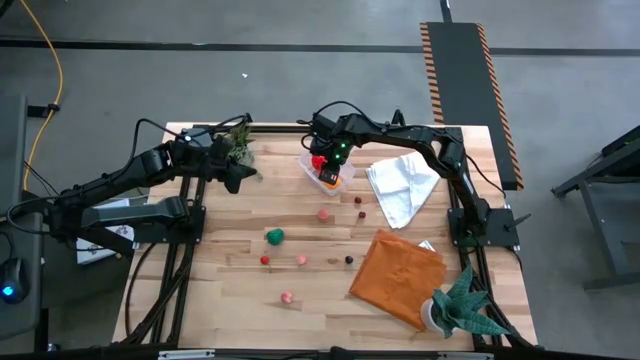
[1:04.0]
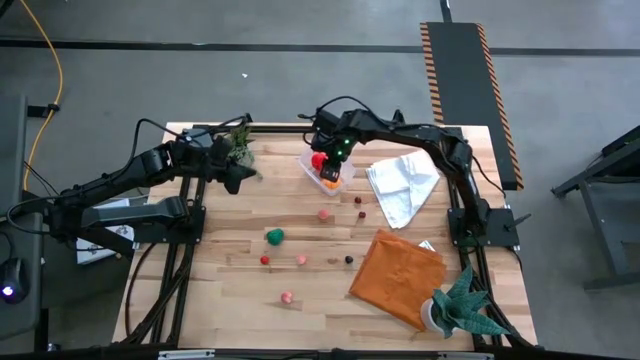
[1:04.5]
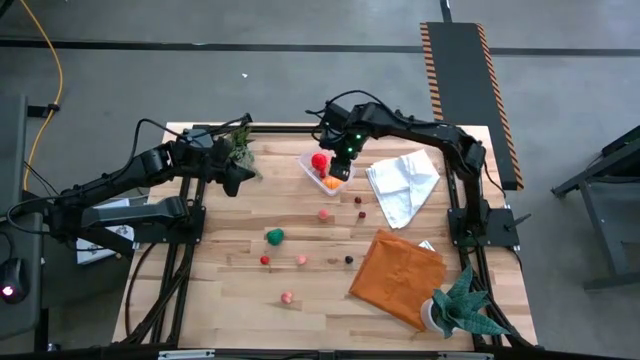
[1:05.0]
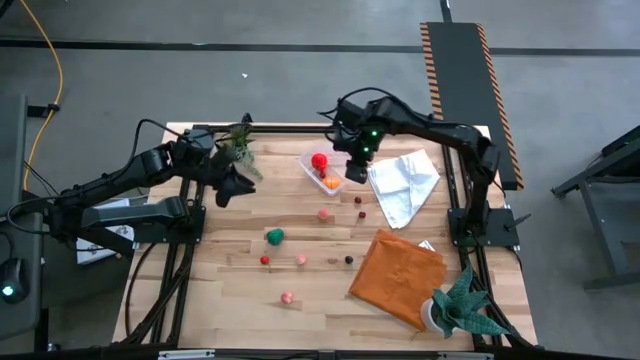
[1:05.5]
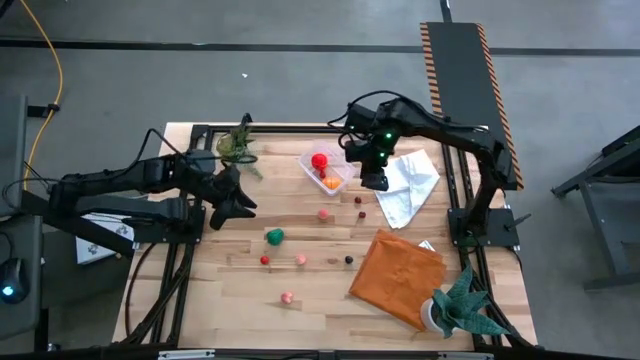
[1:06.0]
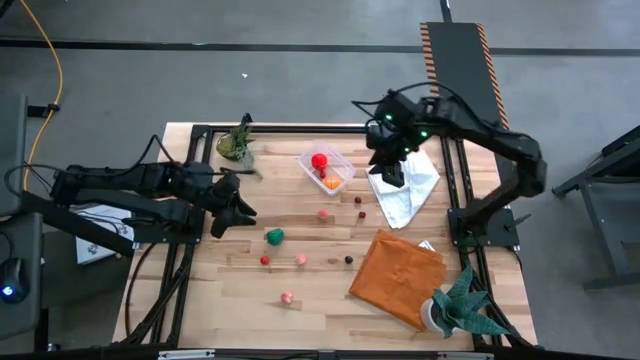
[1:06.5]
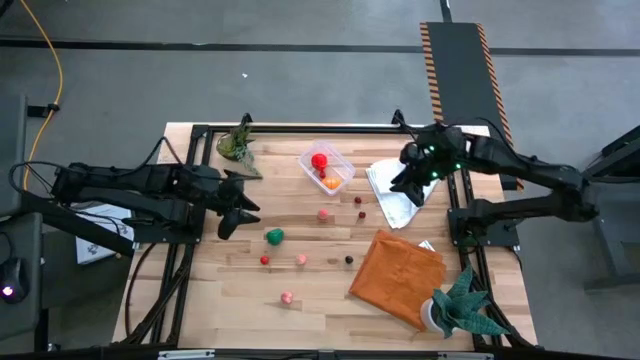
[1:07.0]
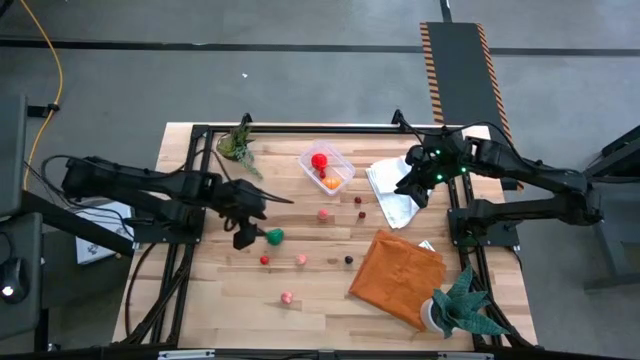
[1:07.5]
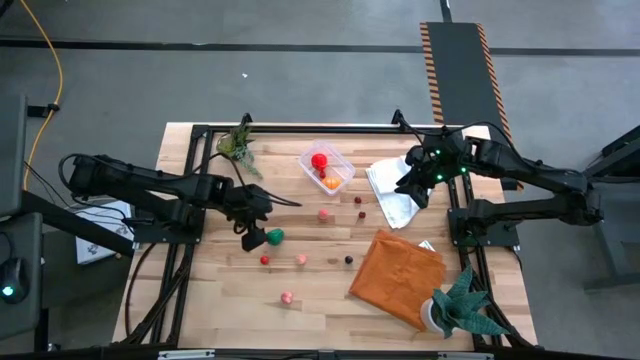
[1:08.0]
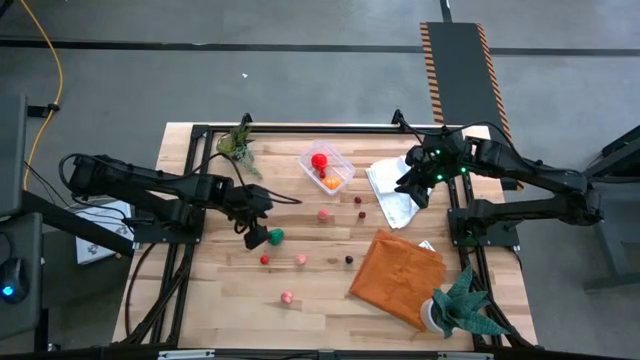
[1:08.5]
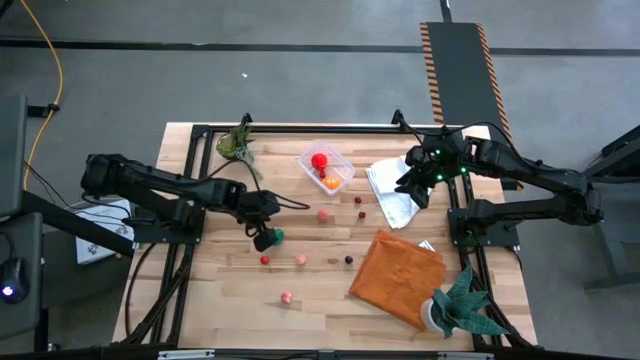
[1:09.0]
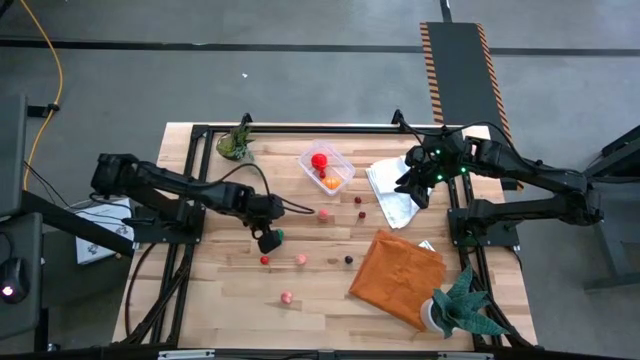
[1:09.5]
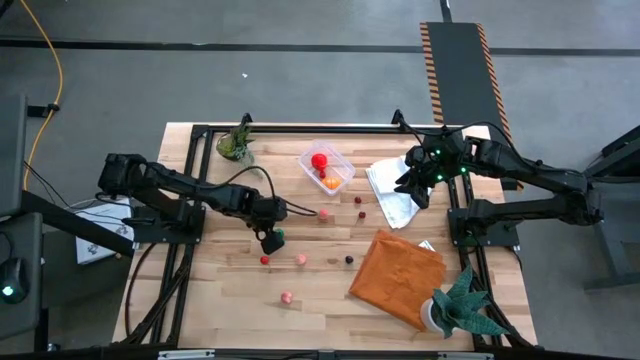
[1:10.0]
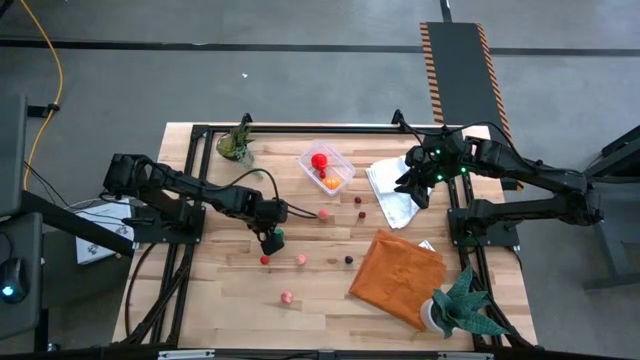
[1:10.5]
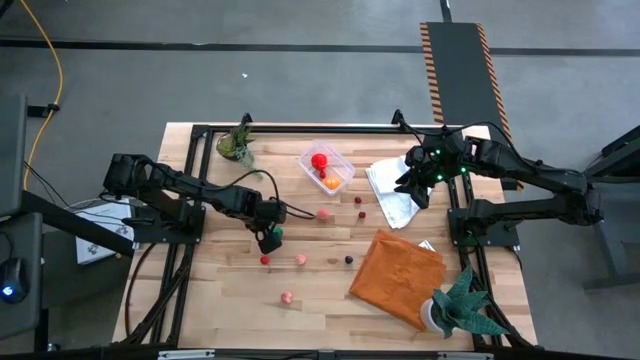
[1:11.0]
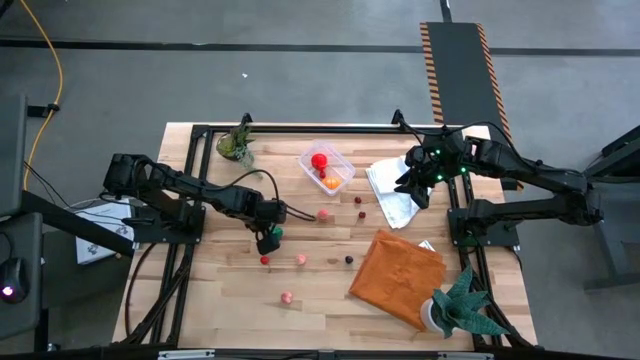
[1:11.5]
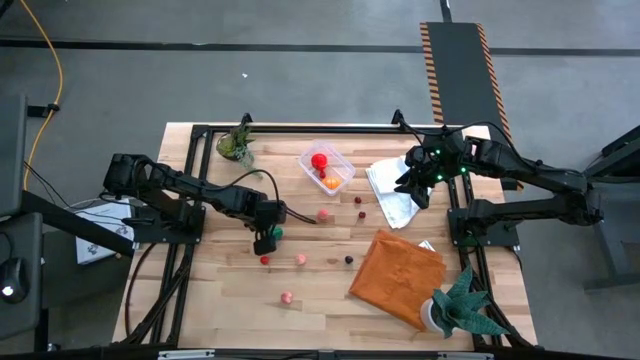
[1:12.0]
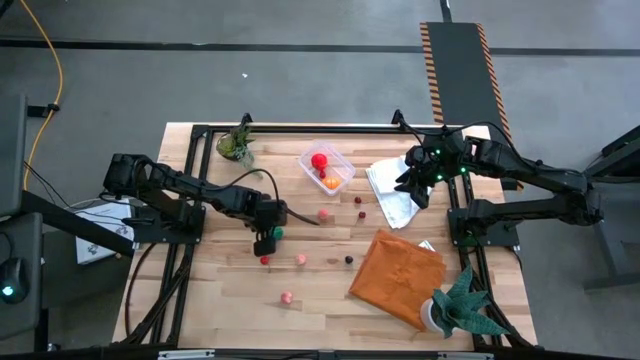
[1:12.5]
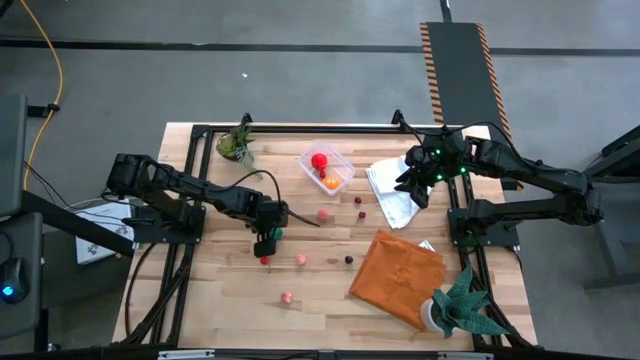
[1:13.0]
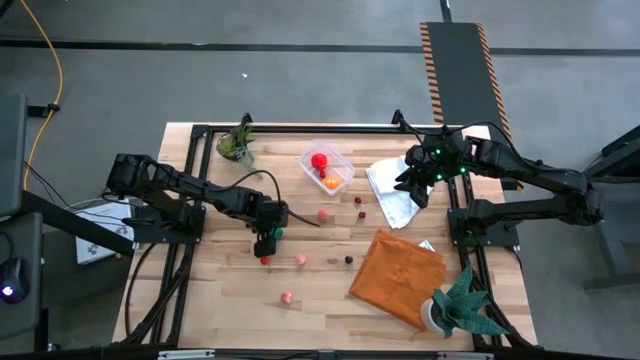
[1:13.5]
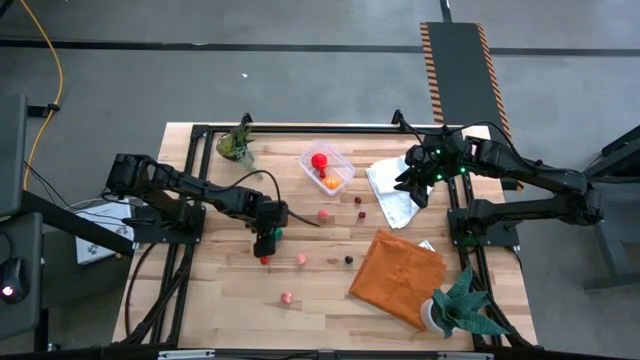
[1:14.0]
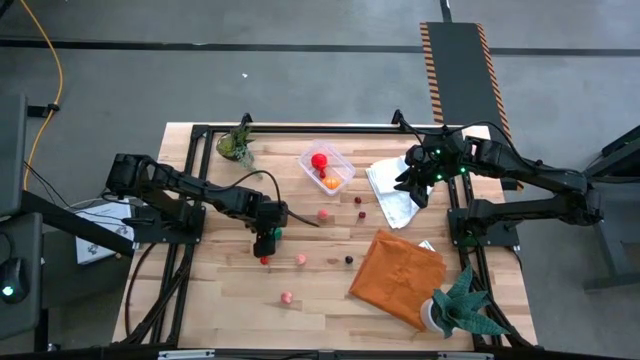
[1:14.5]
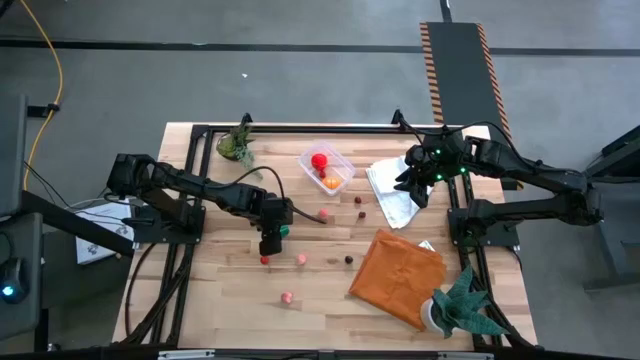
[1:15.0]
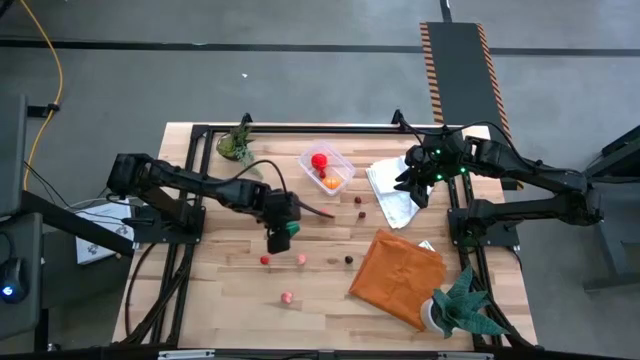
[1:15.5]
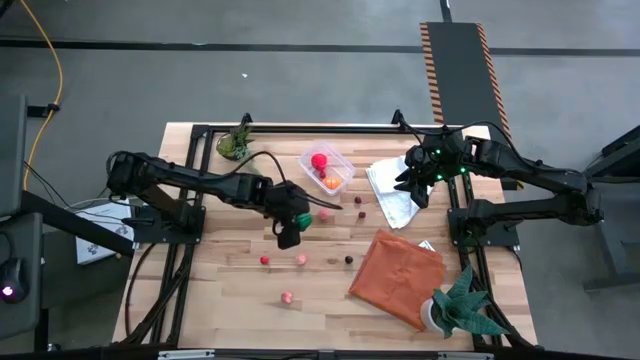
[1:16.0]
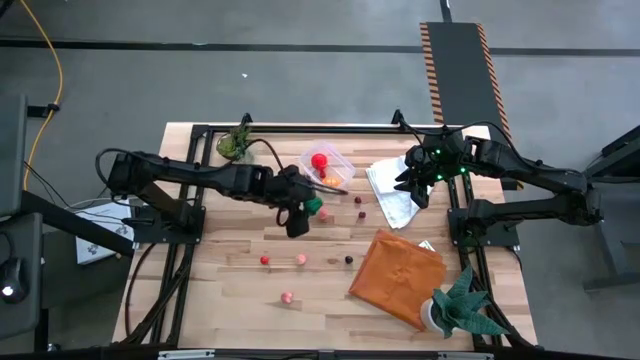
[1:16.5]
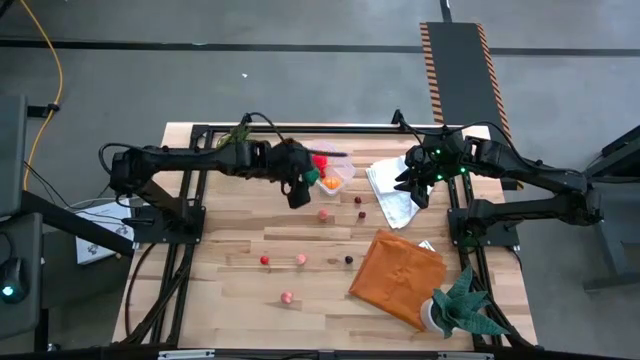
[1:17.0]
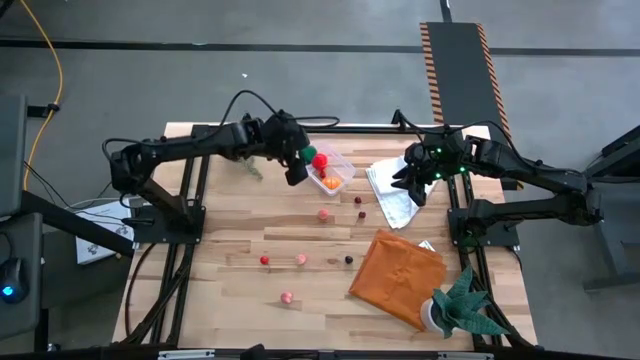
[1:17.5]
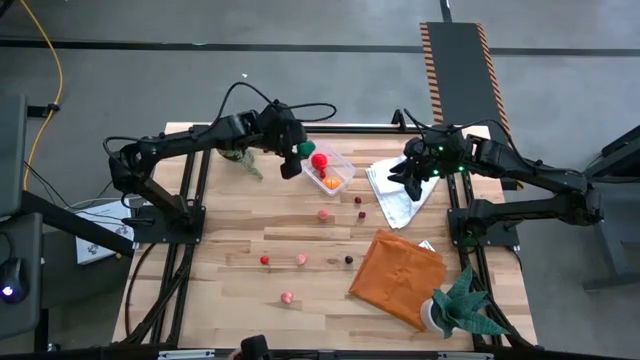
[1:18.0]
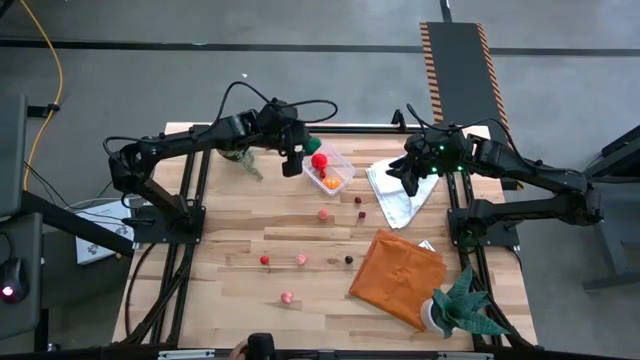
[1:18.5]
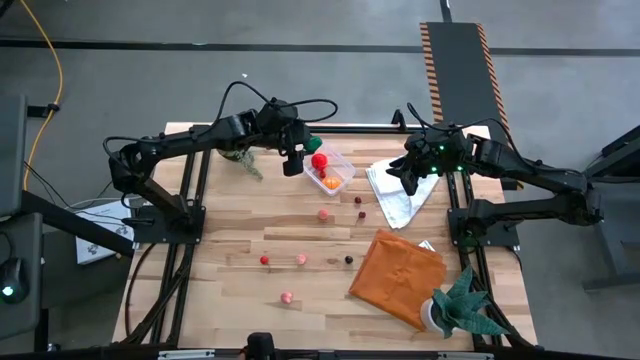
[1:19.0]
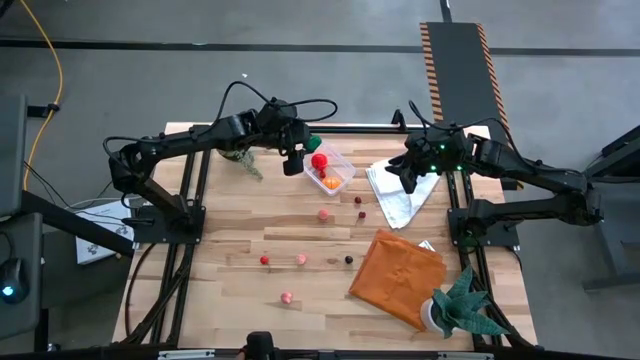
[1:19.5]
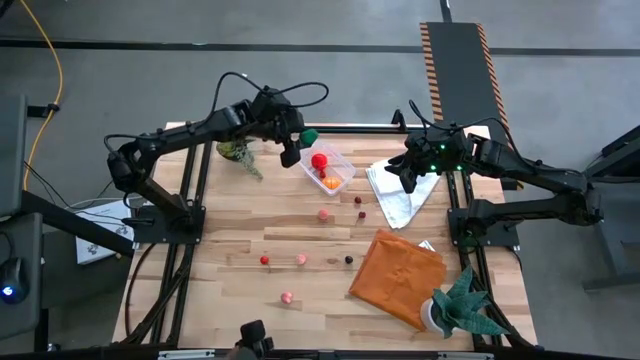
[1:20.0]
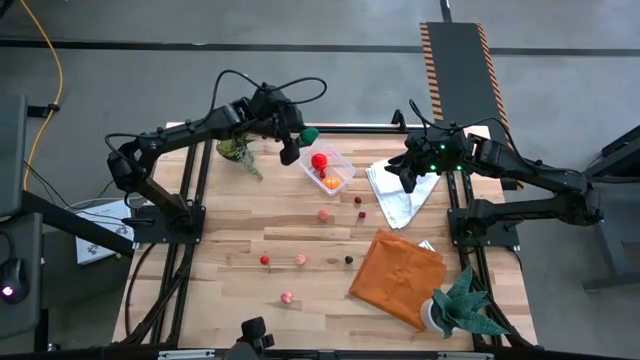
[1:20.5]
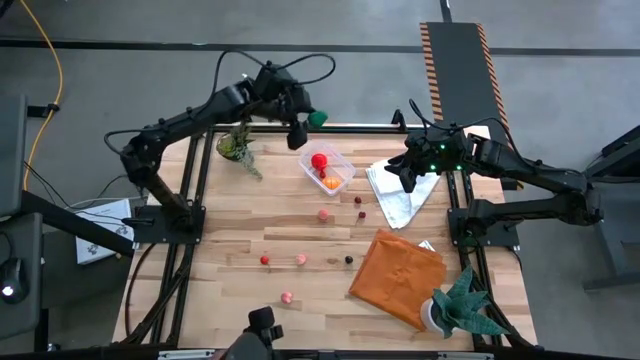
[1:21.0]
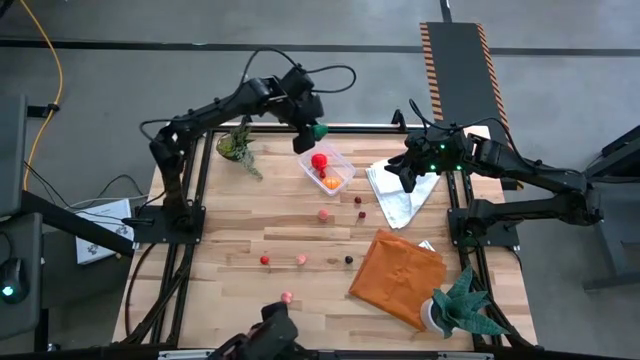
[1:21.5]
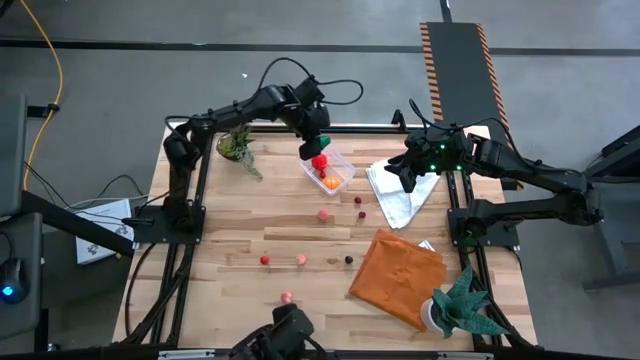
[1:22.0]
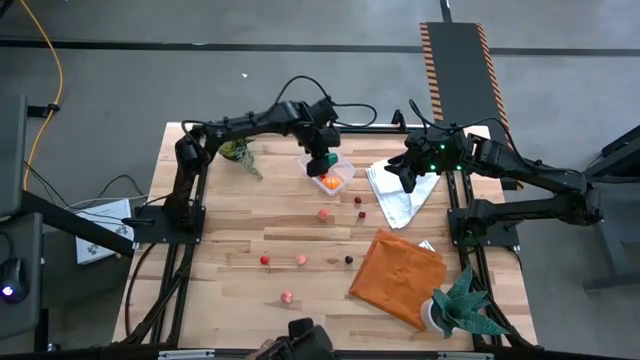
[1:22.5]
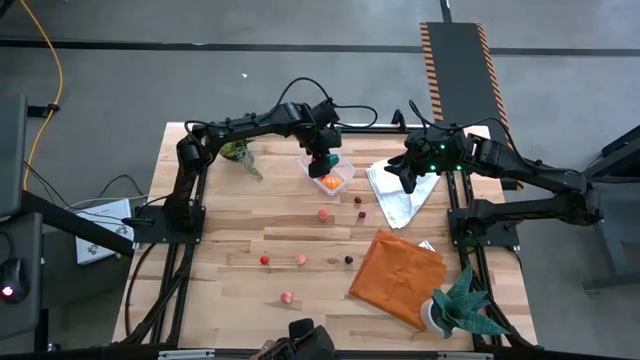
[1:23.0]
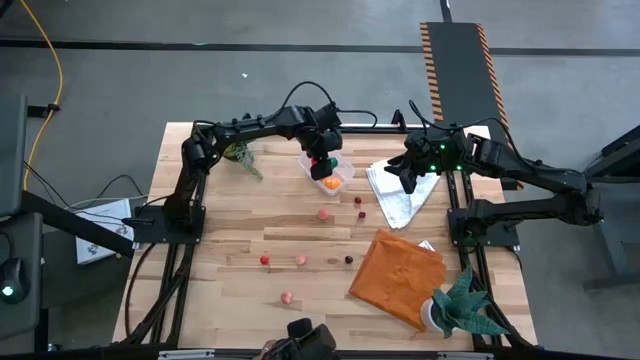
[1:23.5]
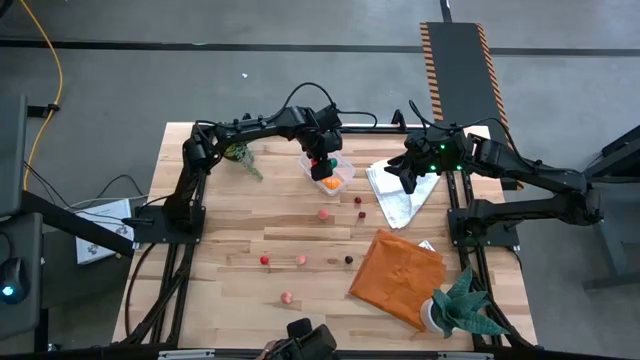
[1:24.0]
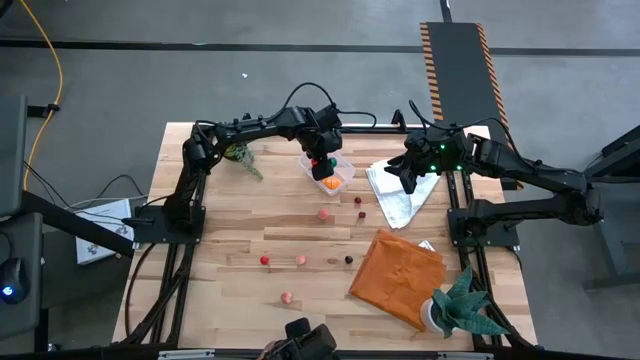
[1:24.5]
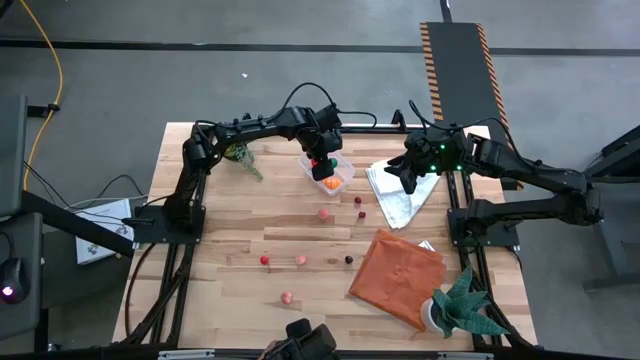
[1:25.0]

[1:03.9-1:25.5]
Task: Pick and placing Produce into tupperware
Put the green bell pepper into the transparent bin
